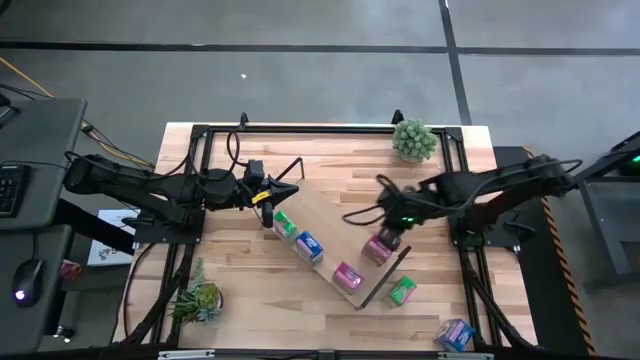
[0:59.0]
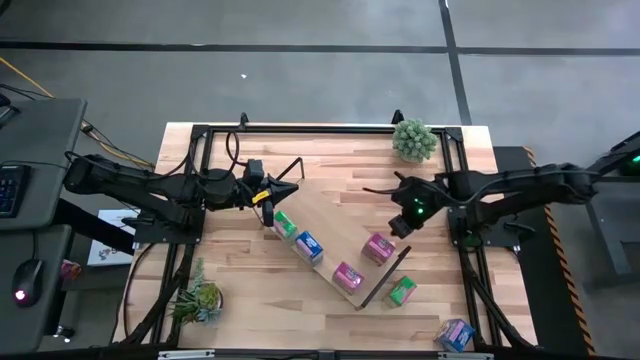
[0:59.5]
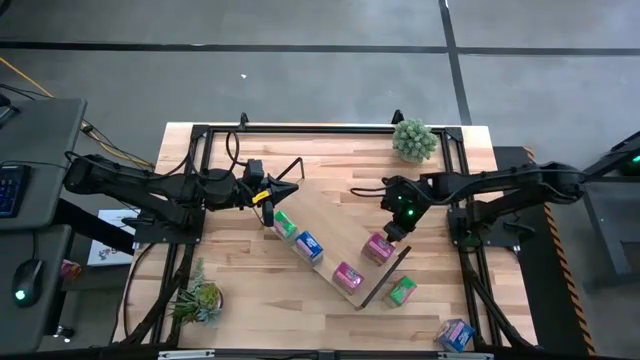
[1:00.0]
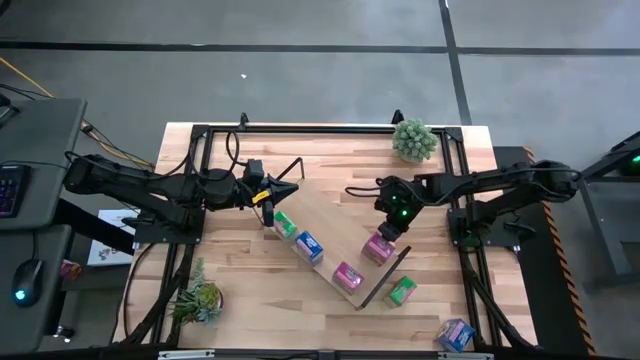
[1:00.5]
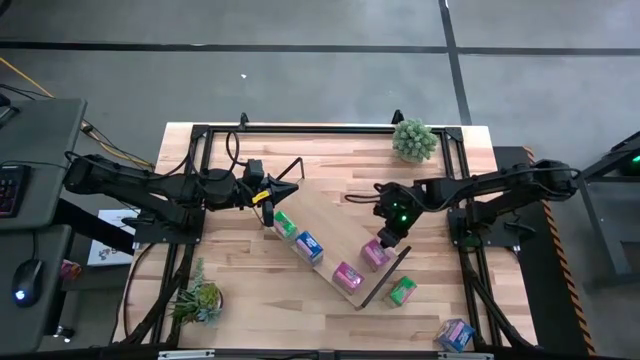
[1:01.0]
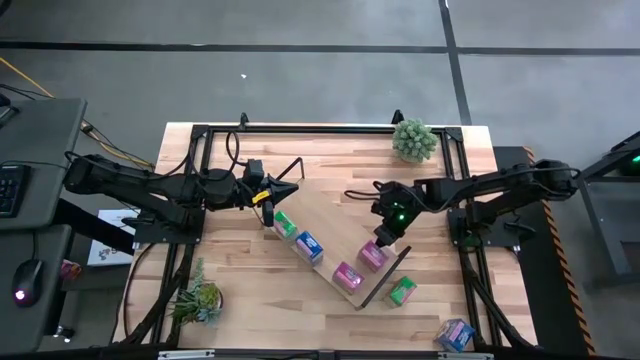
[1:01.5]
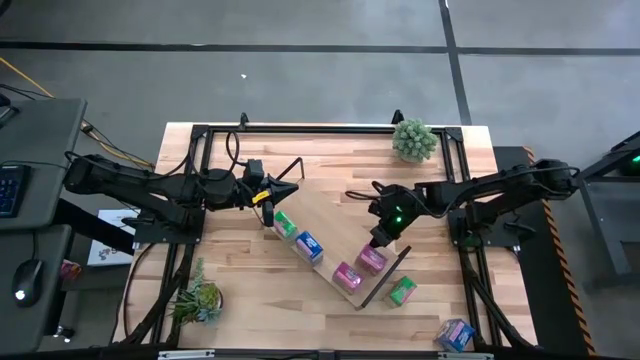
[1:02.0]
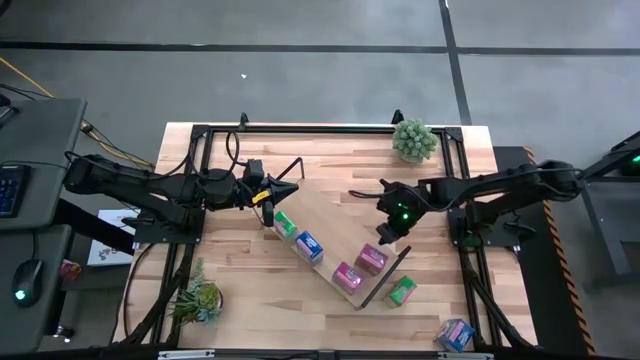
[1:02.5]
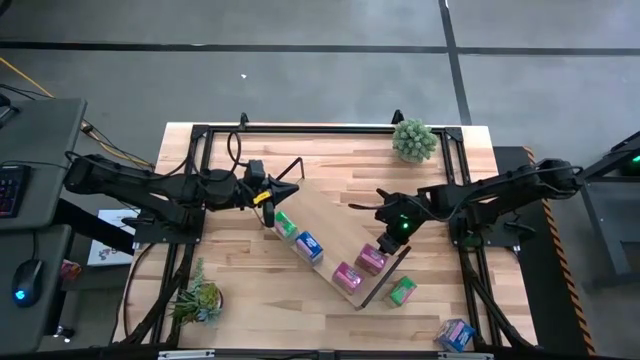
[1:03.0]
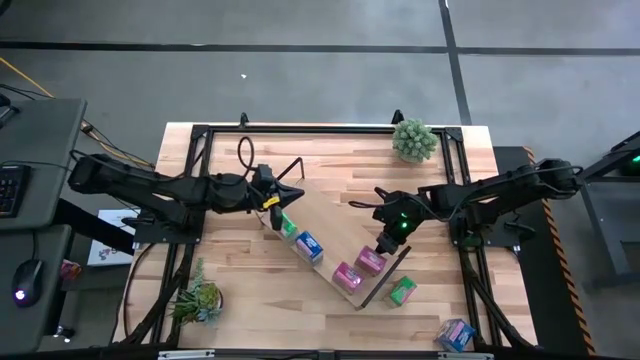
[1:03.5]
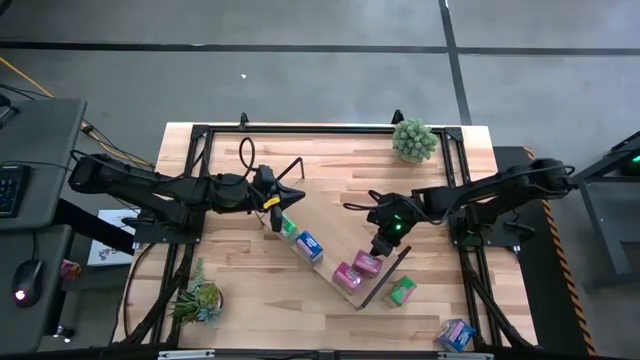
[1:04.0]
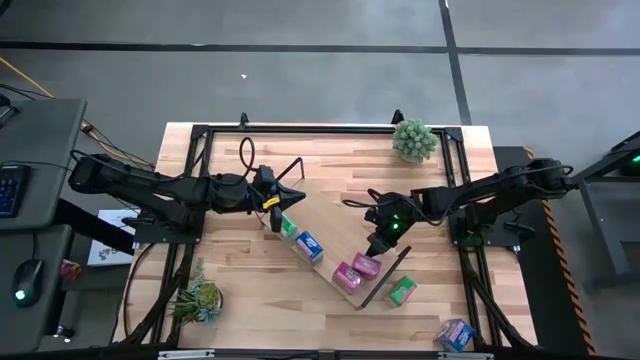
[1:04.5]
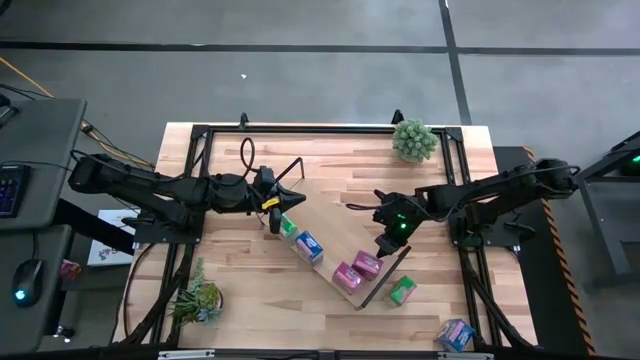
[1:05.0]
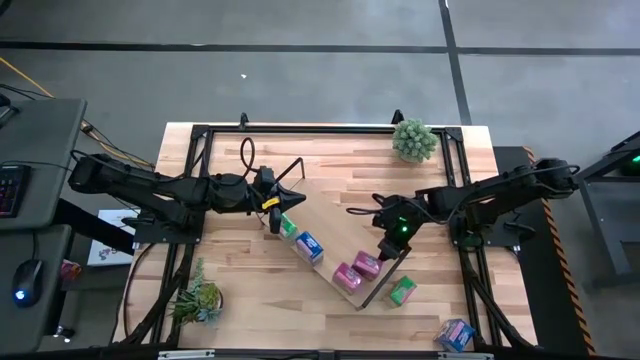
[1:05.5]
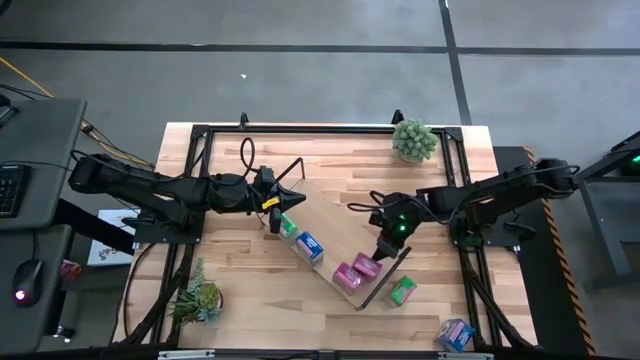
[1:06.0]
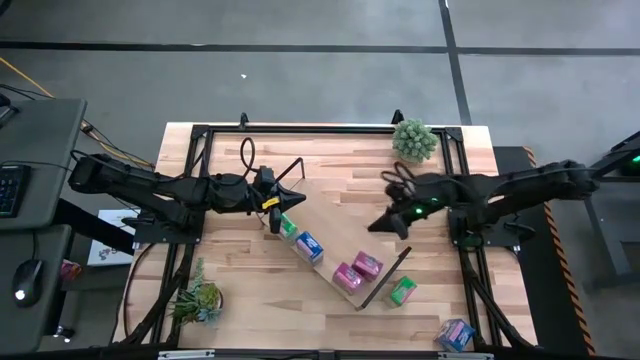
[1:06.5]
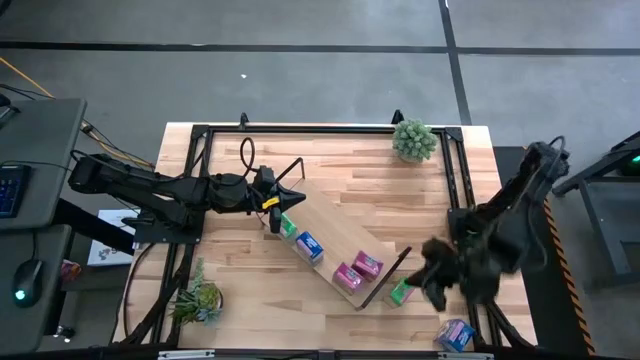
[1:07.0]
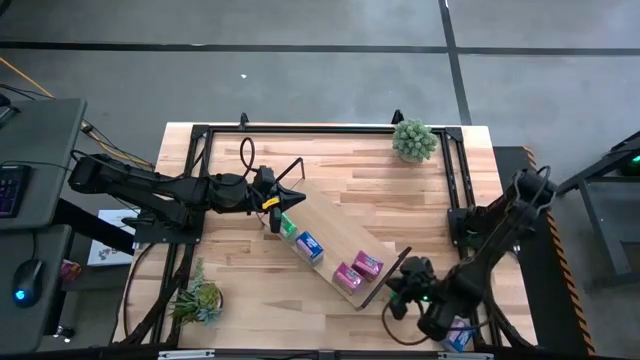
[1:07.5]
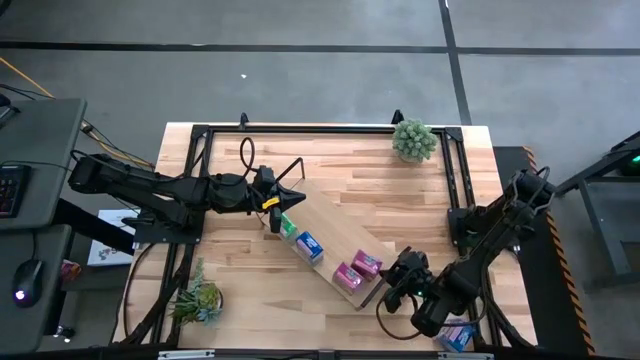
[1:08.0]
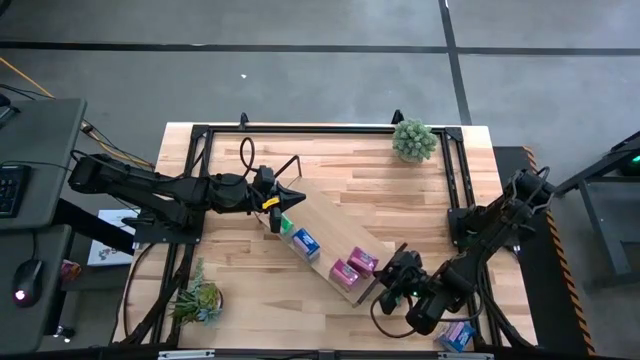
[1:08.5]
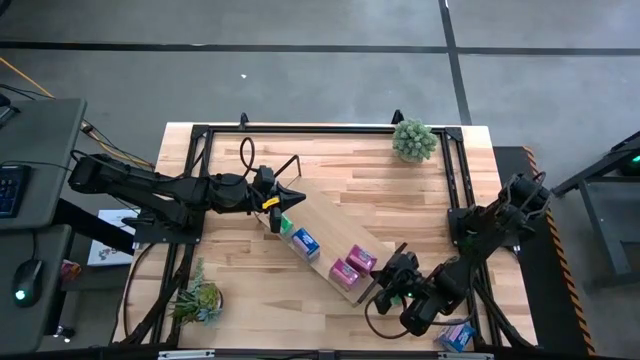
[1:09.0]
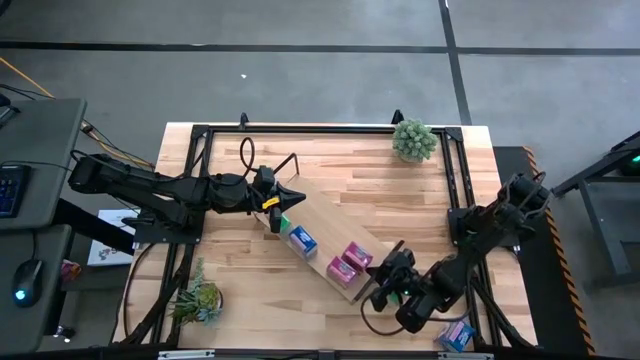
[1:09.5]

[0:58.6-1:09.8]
Task: Stack cereal on shelf
Adjust the violet cereal box in the back on the shelf

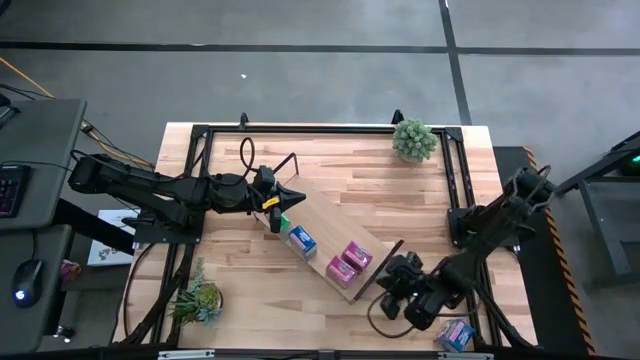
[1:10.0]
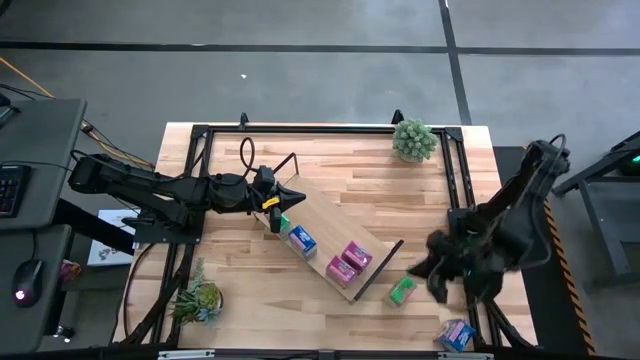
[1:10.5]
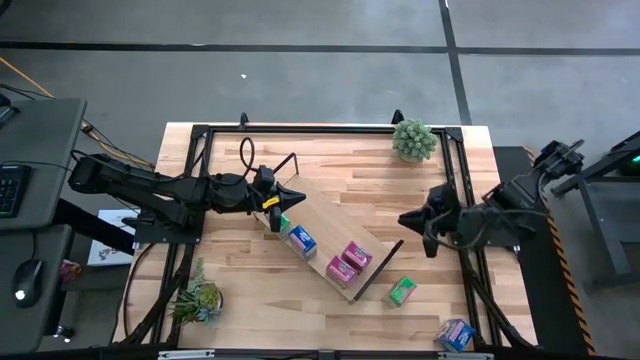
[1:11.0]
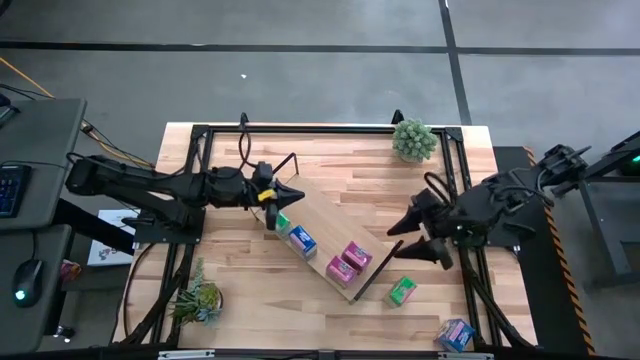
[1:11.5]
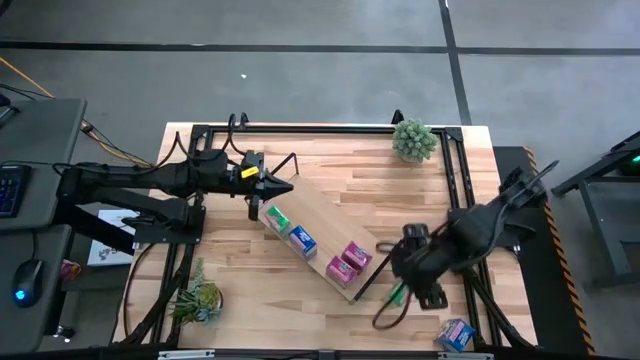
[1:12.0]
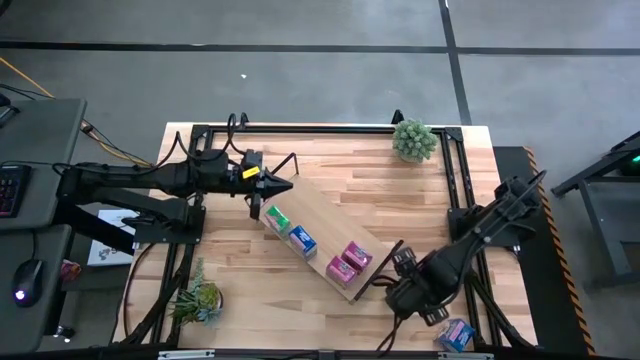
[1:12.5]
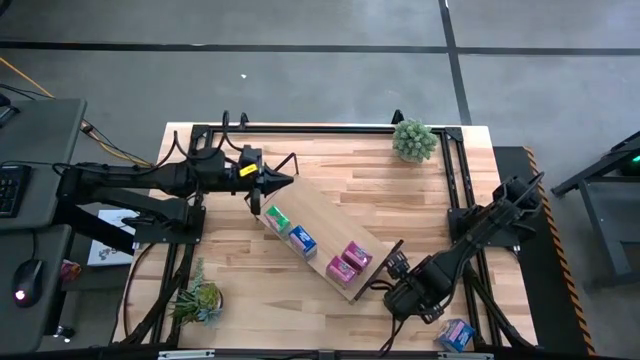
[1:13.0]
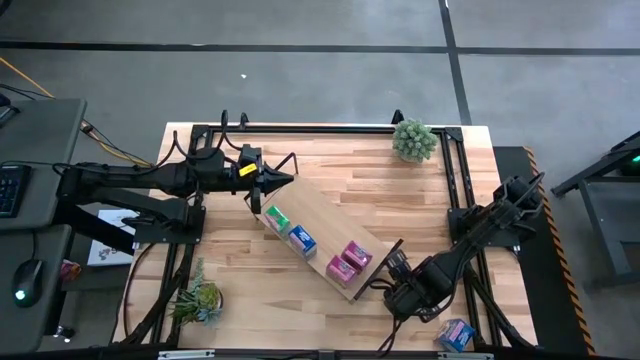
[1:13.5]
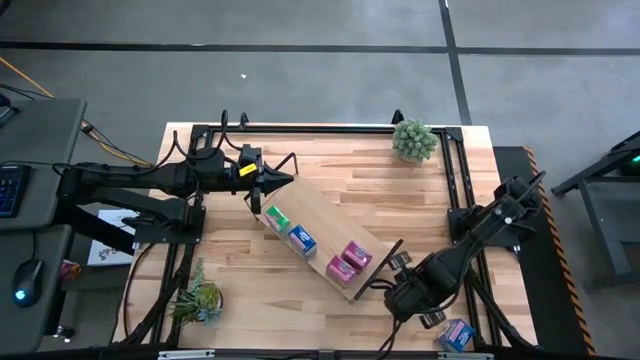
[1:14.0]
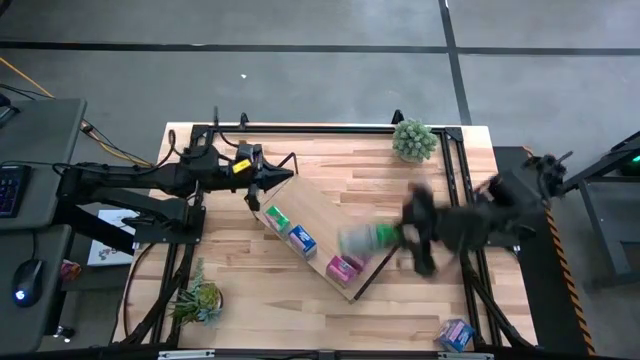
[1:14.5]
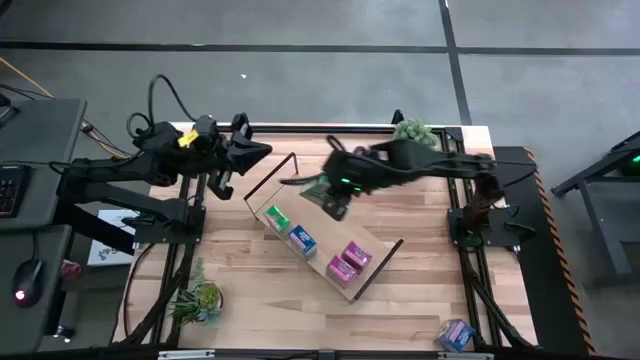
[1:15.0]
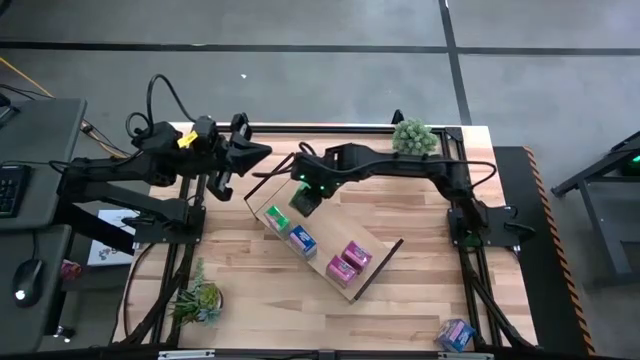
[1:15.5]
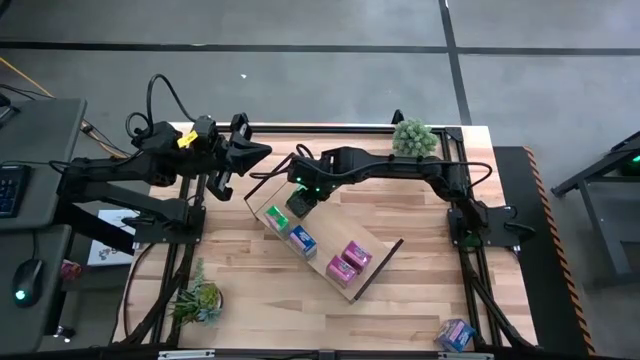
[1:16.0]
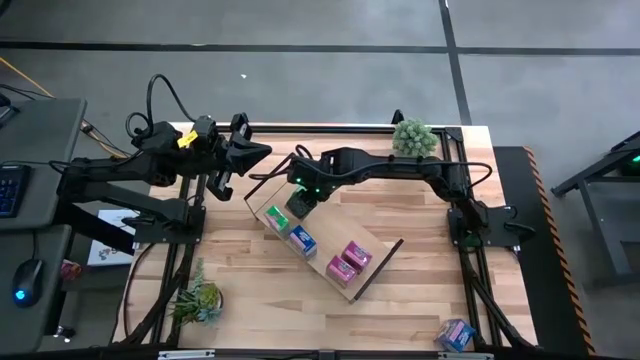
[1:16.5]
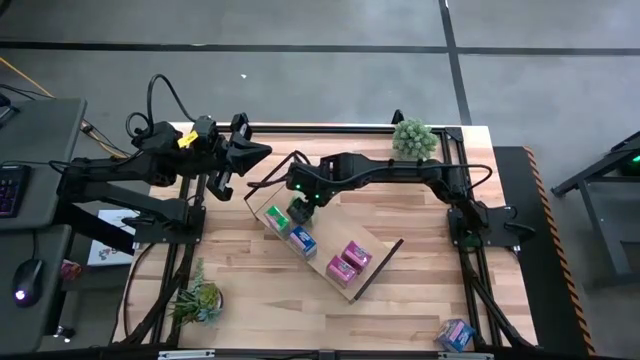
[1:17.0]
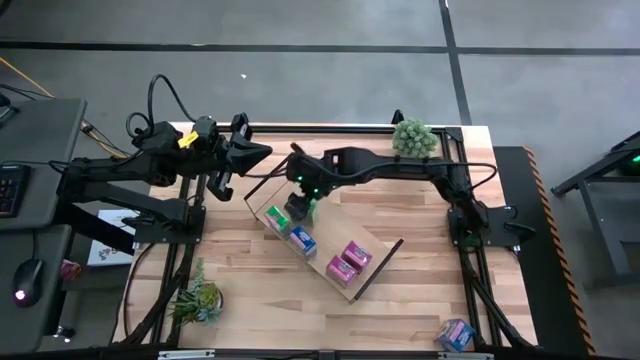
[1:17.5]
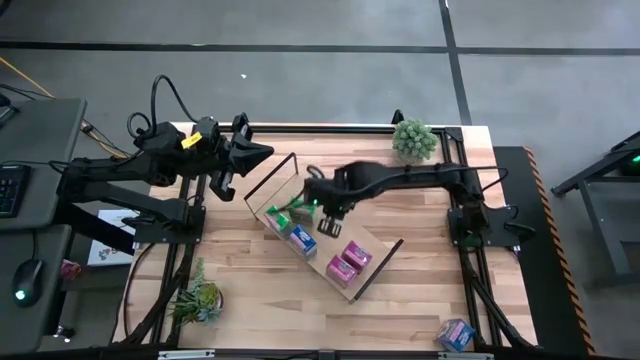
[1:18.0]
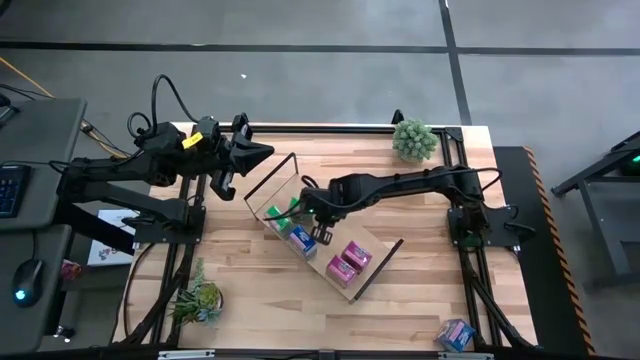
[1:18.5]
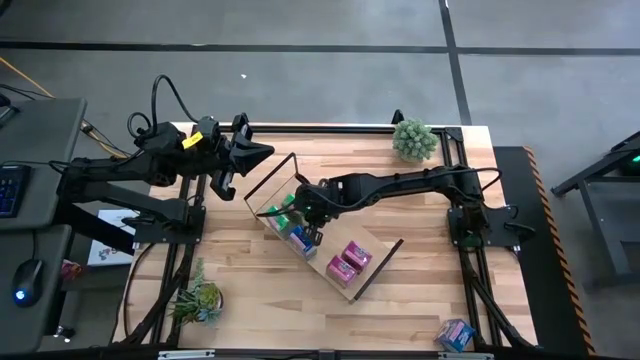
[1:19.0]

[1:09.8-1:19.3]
Put the green cereal box on the shelf aligned with the other green cereal box

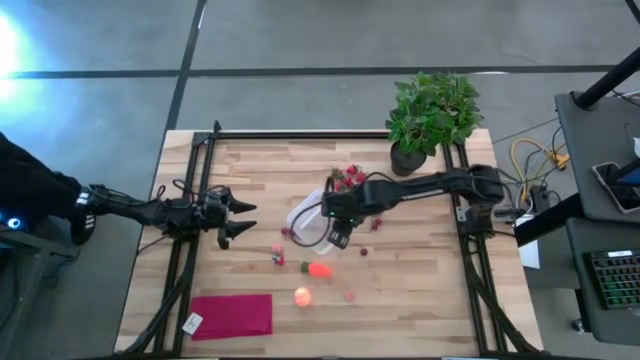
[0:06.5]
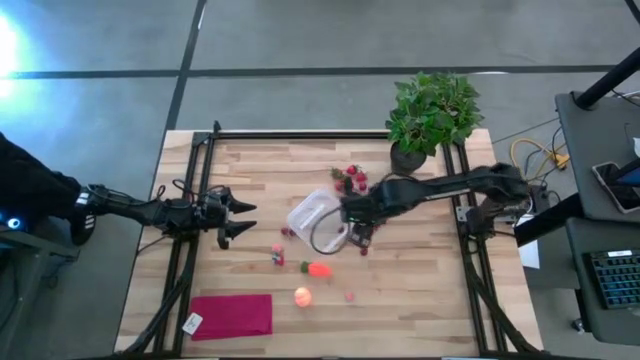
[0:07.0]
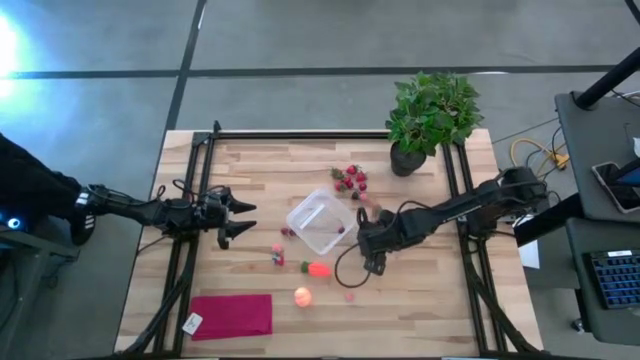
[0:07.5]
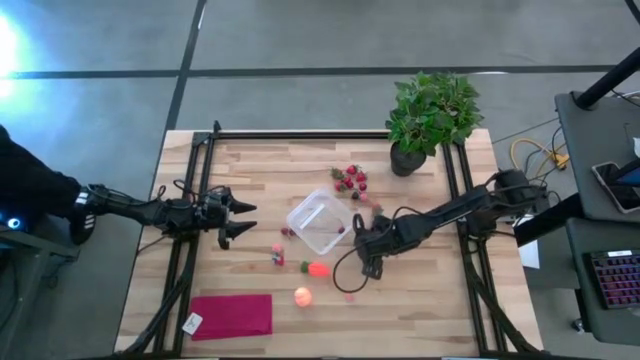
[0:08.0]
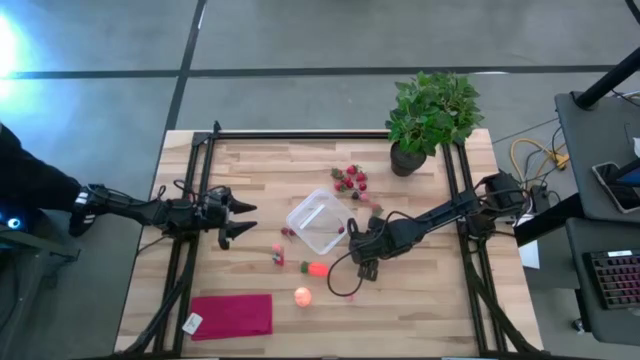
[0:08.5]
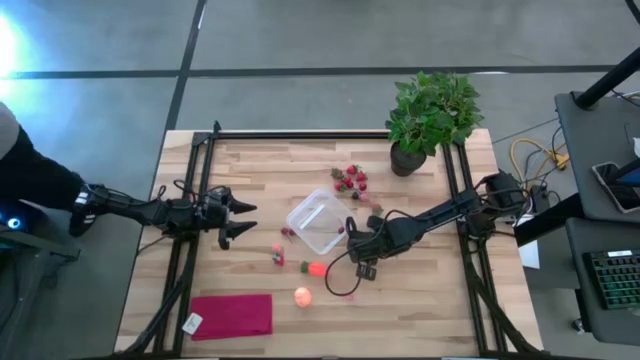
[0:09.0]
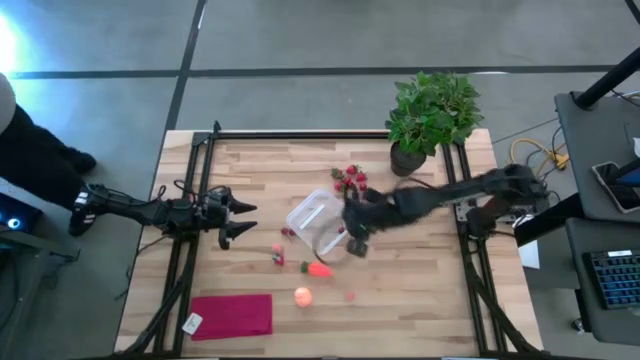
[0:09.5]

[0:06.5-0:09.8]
Task: Pick and placing Produce into tupperware
Put the red cherry into the transparent container
